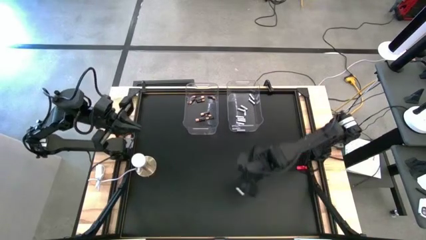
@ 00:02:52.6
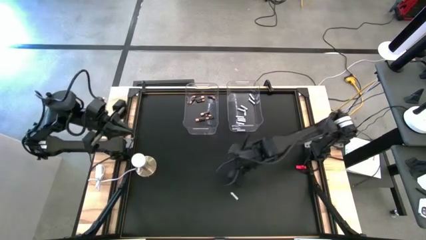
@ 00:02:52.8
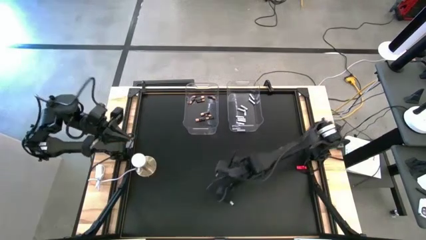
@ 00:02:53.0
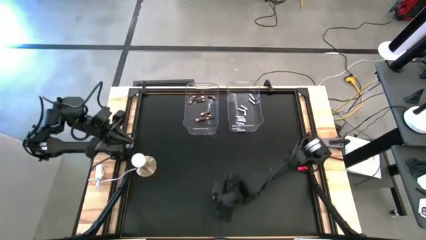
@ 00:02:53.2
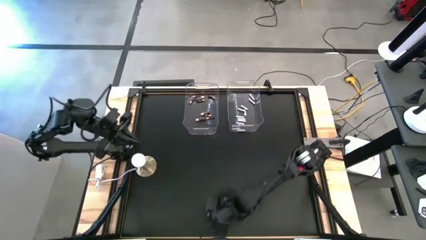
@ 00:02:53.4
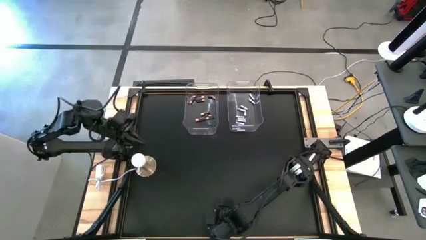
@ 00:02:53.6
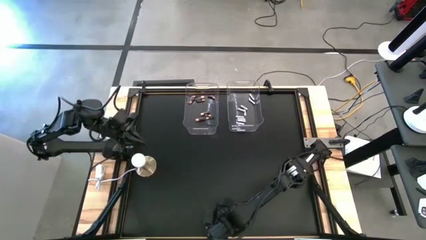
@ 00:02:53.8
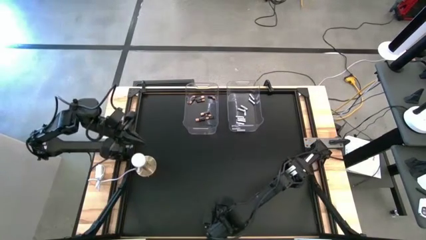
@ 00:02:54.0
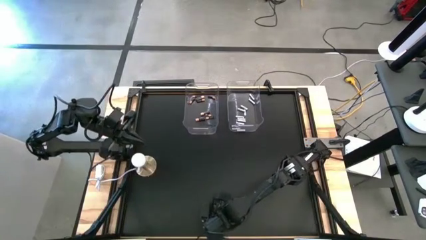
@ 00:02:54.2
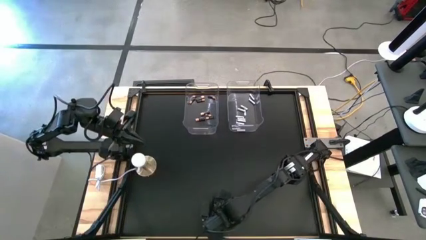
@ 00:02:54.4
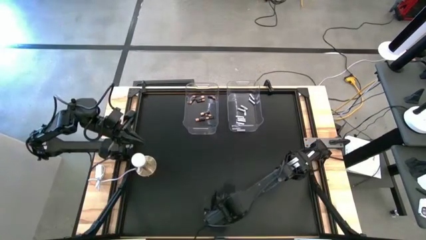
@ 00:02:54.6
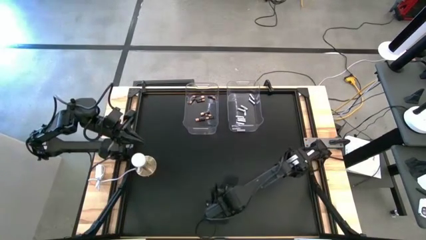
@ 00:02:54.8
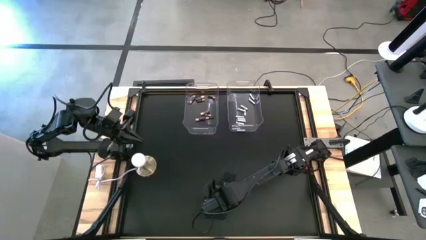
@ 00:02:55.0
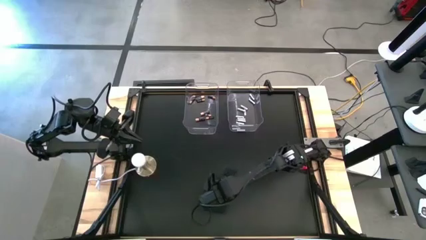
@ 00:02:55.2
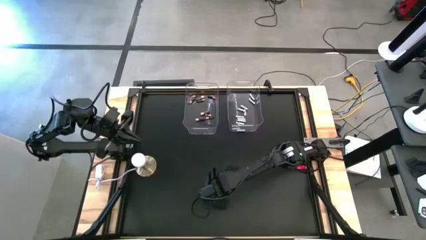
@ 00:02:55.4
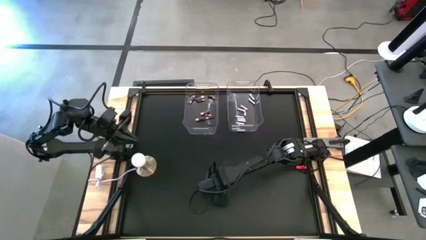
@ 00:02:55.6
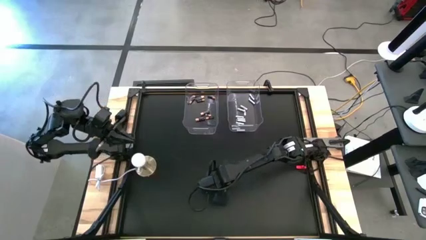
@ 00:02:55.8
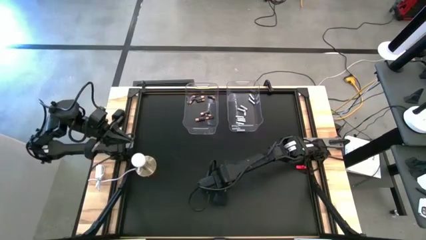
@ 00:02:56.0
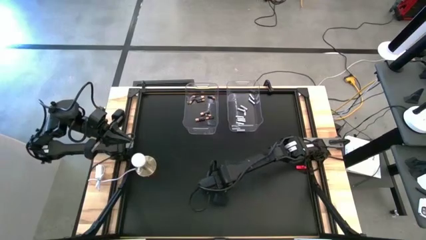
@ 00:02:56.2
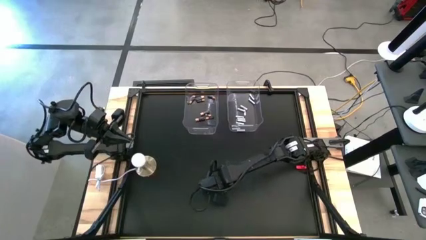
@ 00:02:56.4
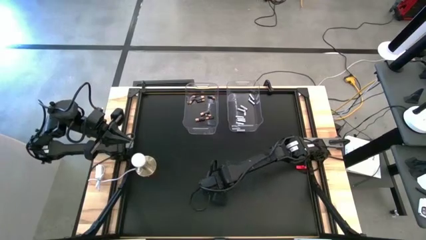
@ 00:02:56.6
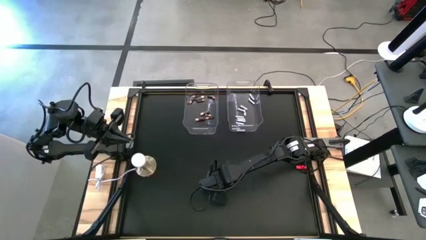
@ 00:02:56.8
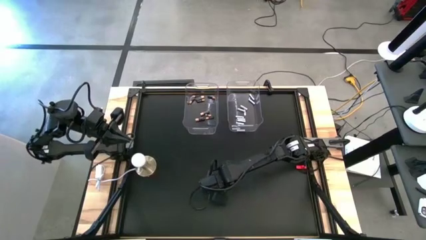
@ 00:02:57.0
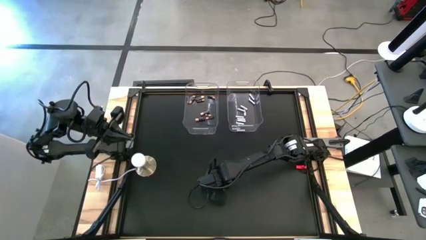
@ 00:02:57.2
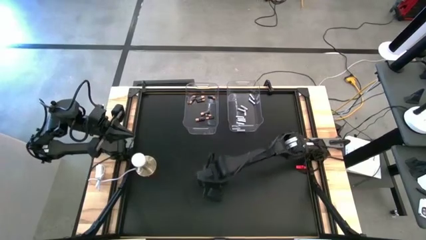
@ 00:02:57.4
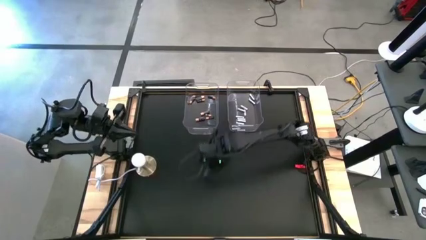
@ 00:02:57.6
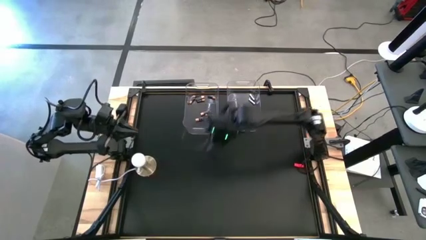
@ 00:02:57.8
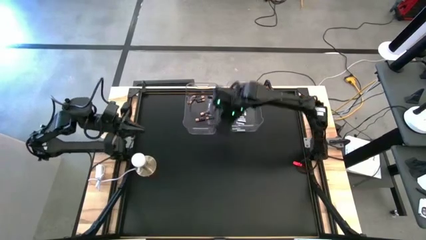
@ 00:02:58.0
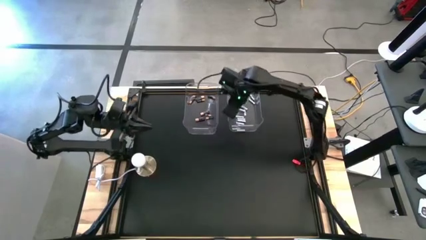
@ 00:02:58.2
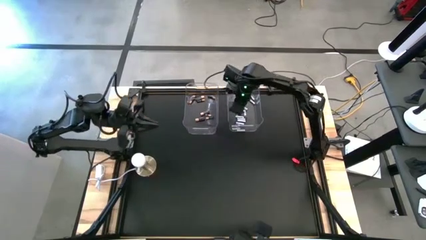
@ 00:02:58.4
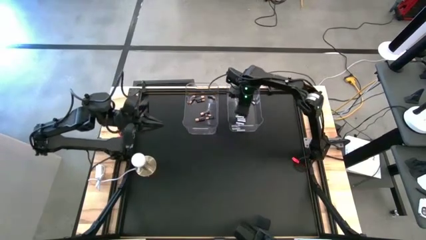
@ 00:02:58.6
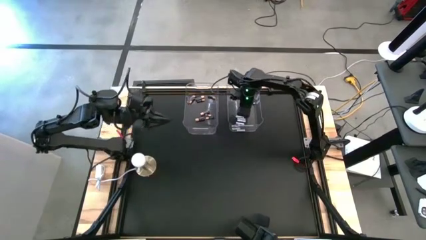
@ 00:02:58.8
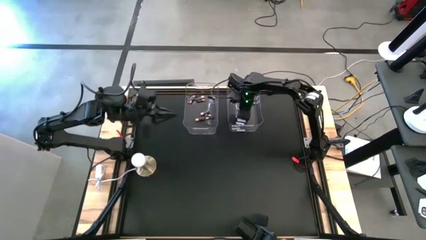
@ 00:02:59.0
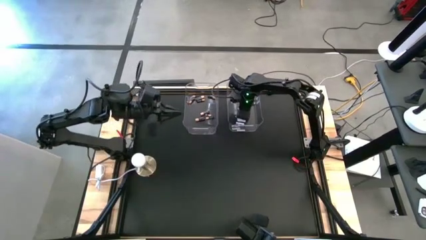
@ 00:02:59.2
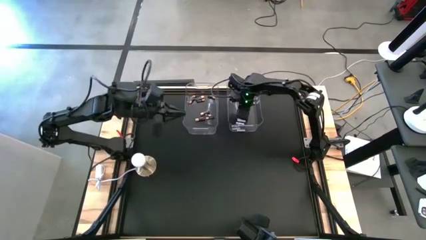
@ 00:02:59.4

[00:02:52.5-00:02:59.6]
Task: Sort batteries
Put the white battery into the right transparent bin

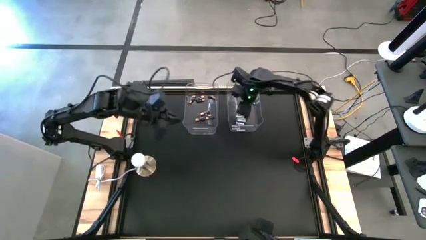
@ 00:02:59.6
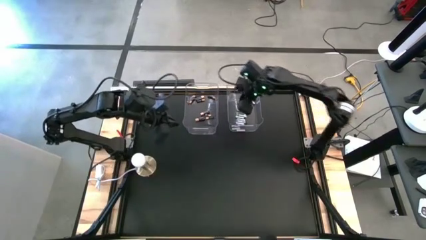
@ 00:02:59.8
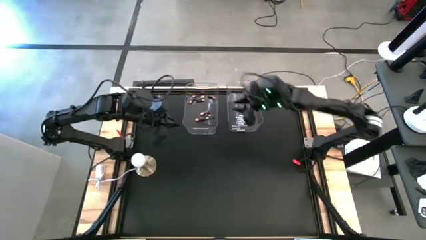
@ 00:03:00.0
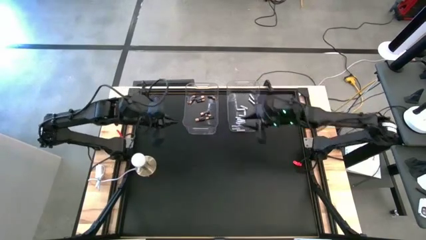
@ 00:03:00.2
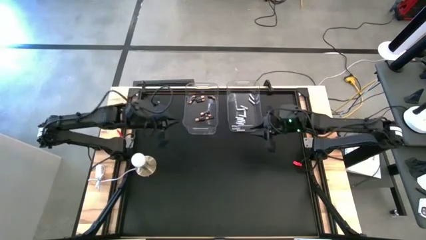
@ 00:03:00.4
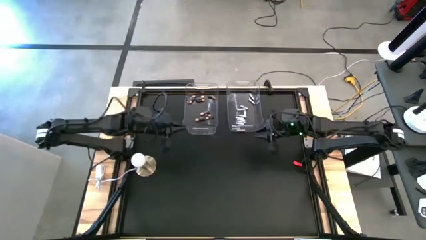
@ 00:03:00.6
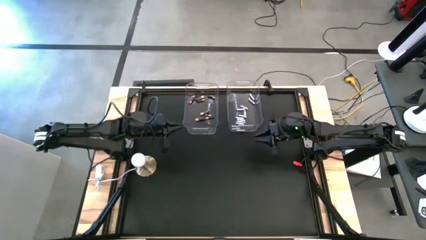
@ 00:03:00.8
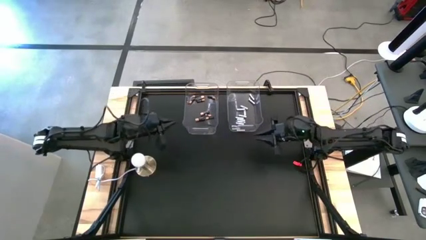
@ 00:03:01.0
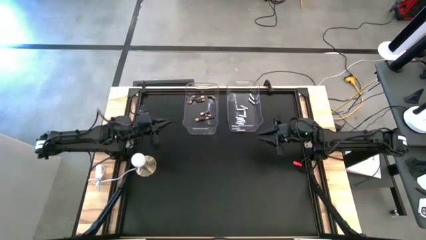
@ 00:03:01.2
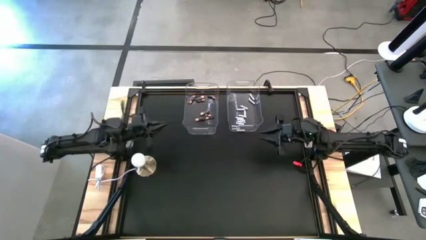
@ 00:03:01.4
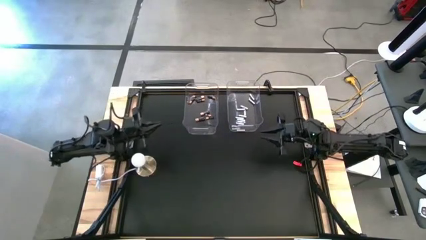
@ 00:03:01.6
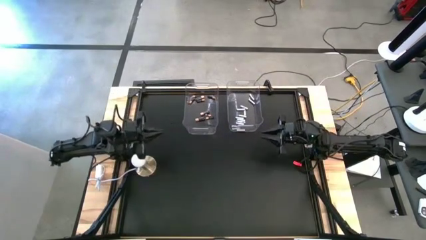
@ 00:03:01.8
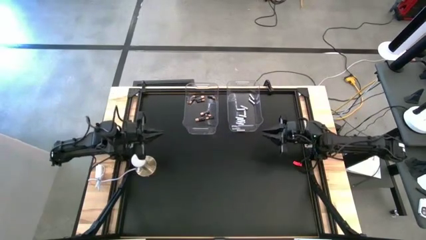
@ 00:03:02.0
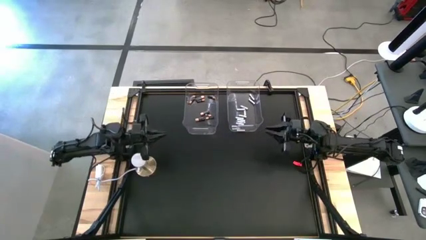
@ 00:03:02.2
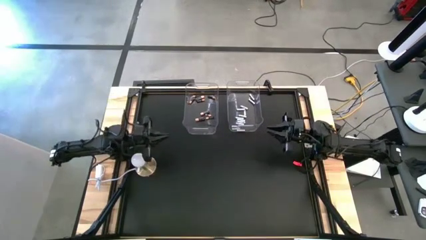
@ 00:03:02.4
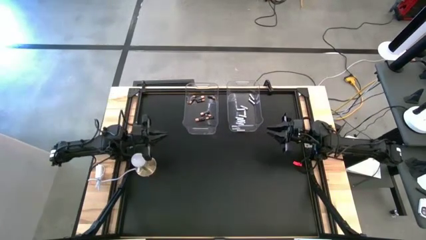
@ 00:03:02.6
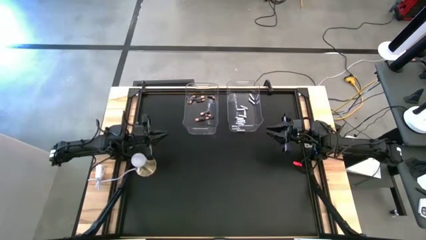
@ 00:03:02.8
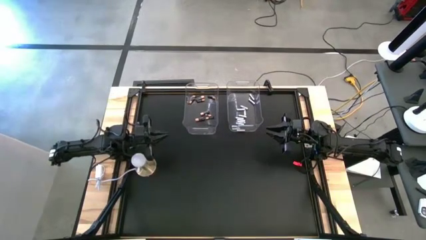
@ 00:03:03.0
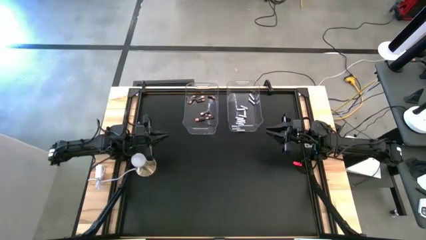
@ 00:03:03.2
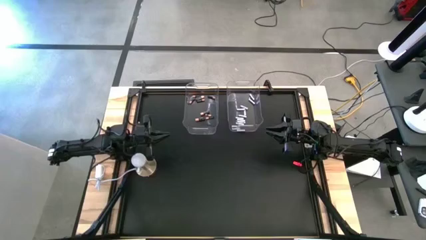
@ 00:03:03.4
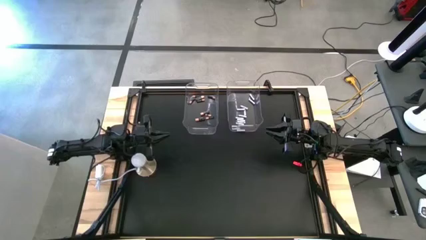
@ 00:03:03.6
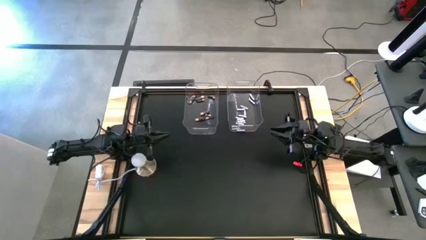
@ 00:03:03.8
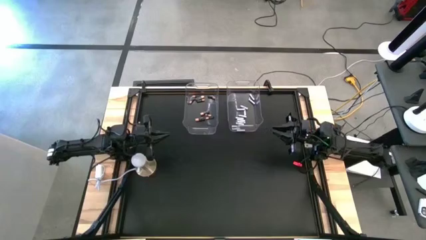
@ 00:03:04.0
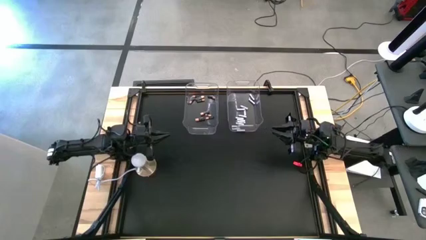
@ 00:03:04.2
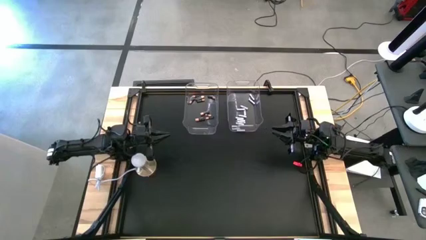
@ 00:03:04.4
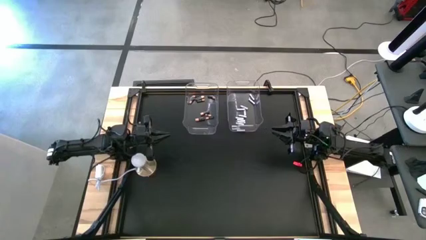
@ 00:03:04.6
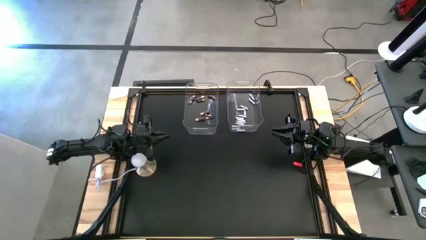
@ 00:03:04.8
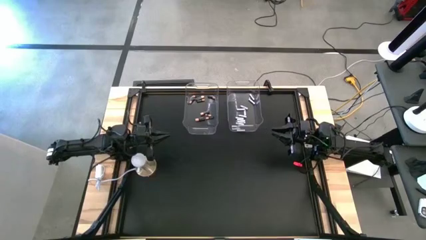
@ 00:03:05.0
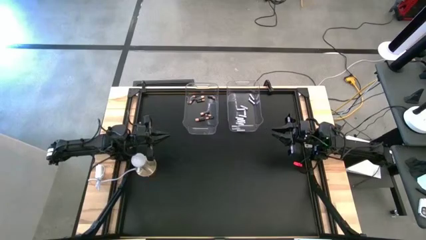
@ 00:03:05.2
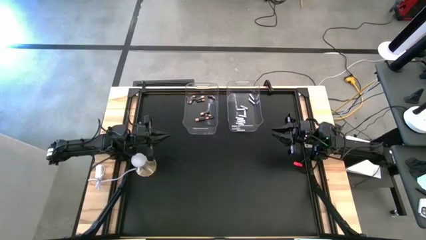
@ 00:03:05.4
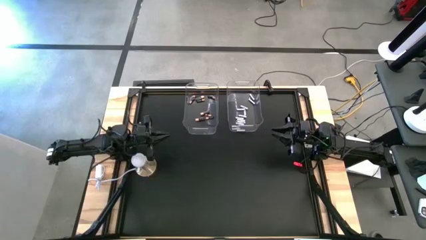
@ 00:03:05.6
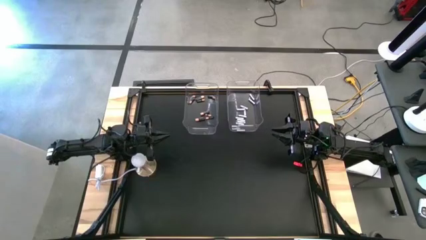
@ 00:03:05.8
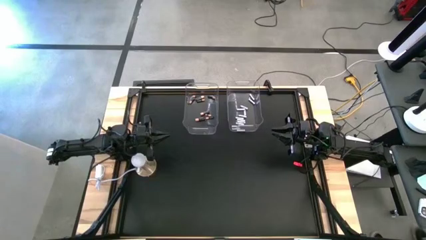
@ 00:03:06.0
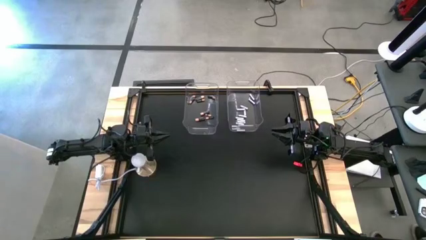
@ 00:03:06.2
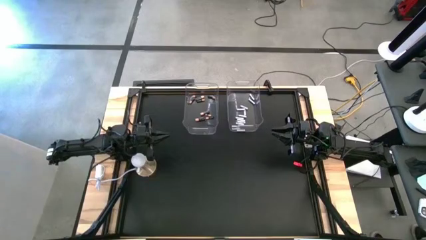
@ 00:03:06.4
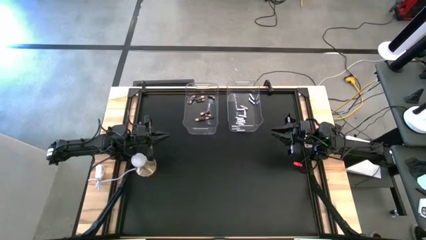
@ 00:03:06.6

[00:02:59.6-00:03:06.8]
Return to Home Position
